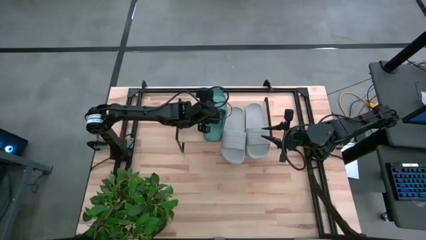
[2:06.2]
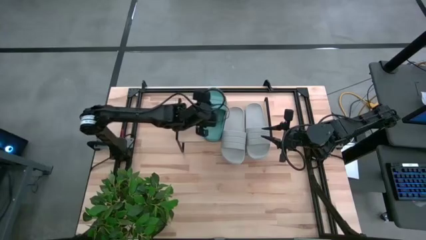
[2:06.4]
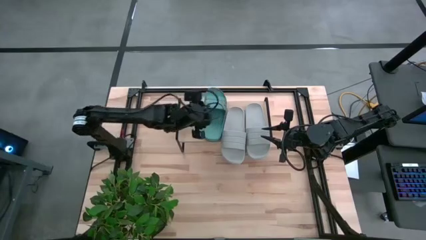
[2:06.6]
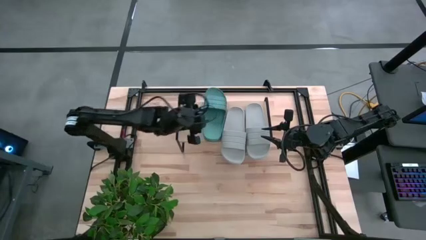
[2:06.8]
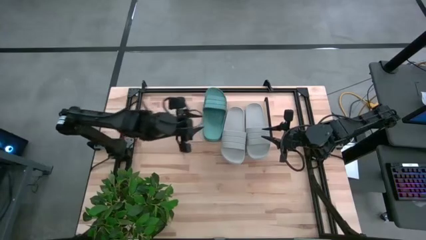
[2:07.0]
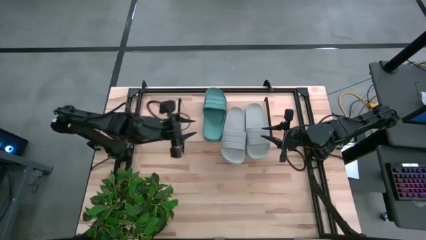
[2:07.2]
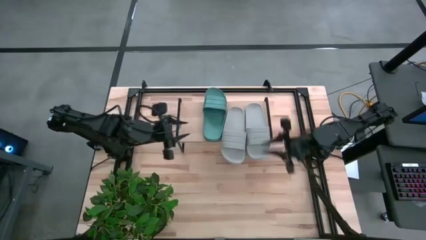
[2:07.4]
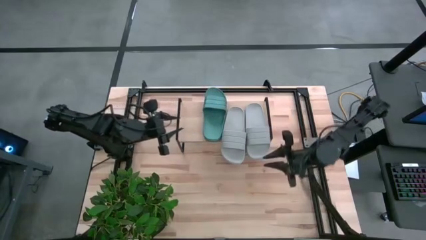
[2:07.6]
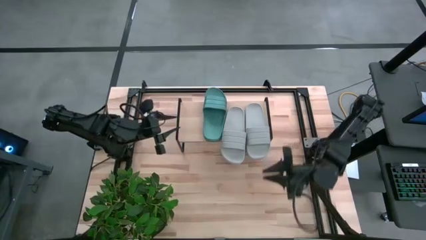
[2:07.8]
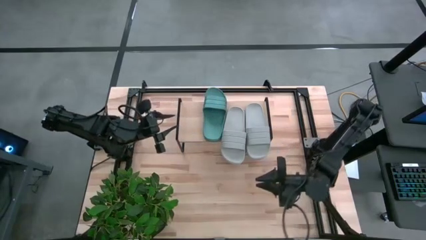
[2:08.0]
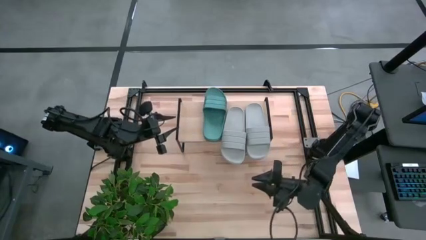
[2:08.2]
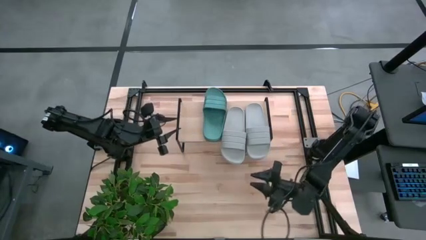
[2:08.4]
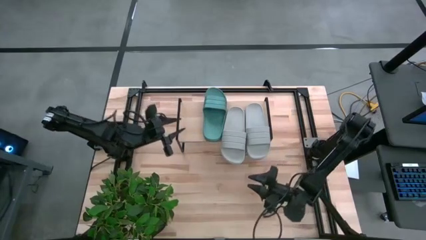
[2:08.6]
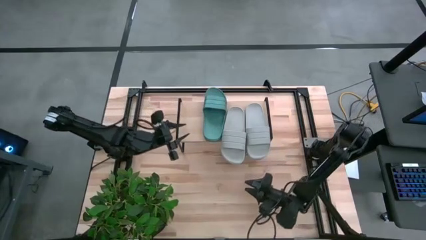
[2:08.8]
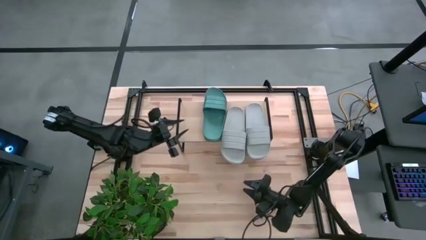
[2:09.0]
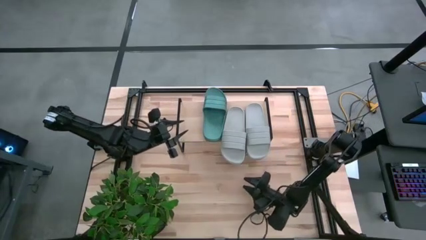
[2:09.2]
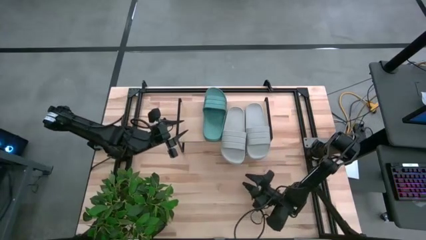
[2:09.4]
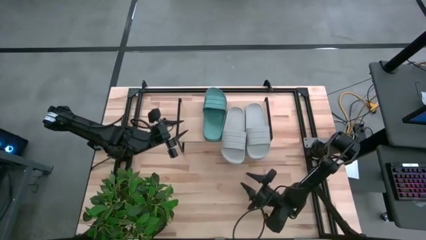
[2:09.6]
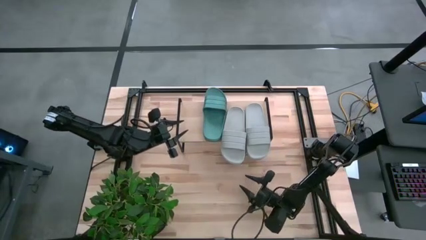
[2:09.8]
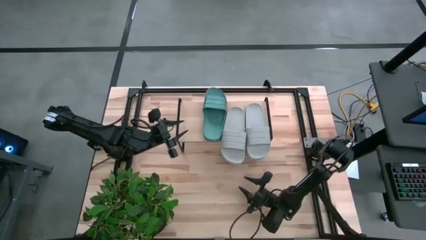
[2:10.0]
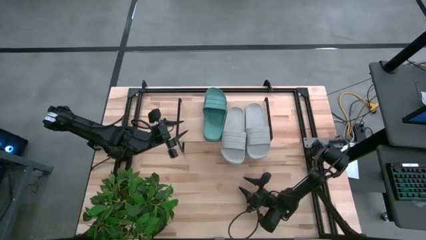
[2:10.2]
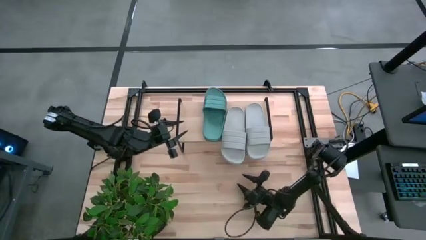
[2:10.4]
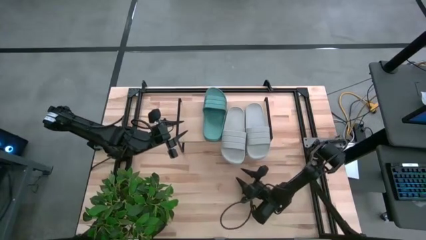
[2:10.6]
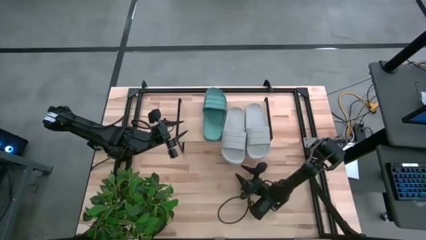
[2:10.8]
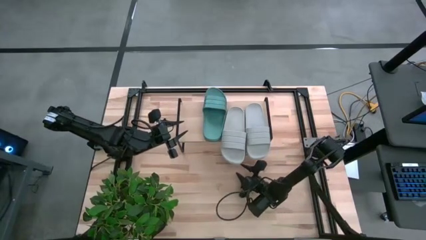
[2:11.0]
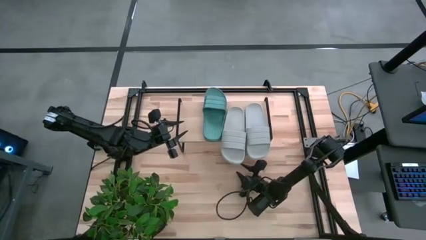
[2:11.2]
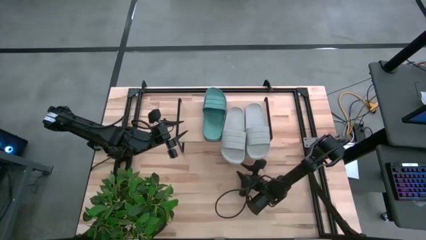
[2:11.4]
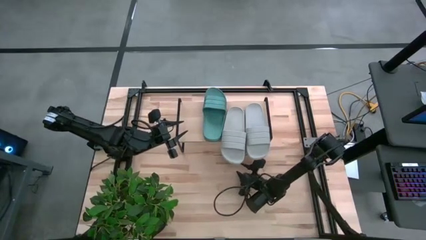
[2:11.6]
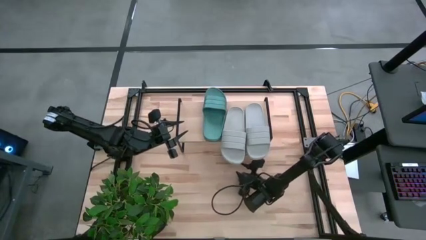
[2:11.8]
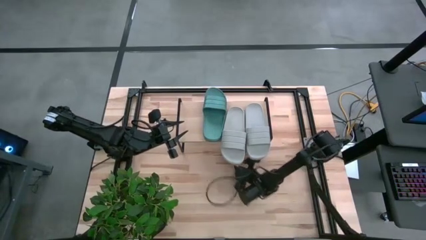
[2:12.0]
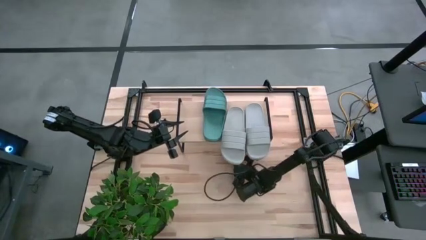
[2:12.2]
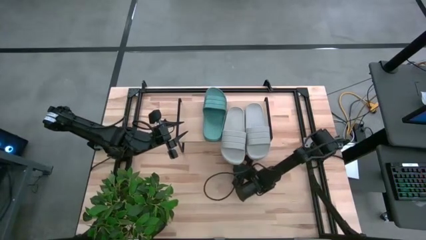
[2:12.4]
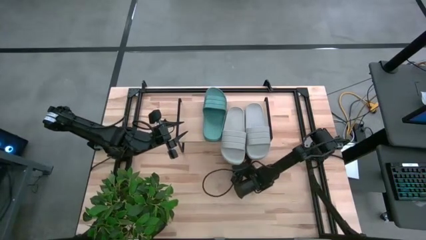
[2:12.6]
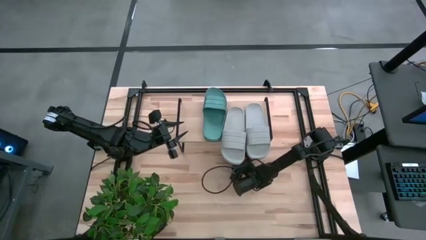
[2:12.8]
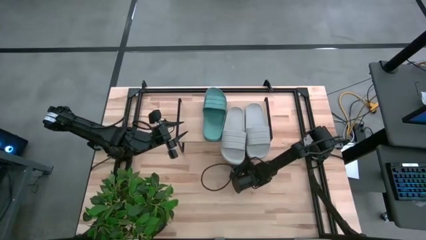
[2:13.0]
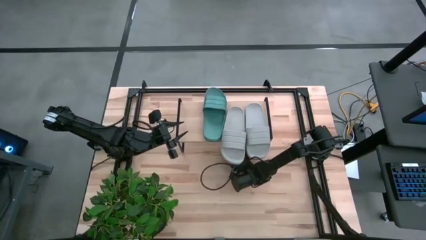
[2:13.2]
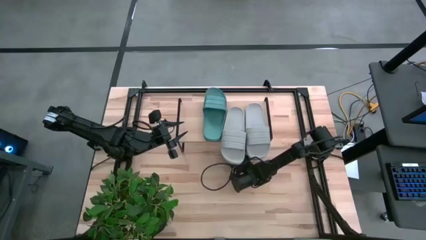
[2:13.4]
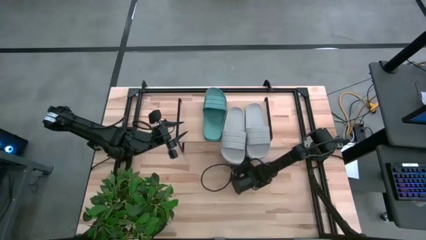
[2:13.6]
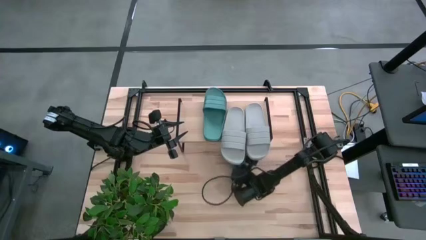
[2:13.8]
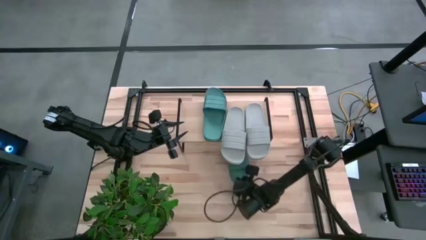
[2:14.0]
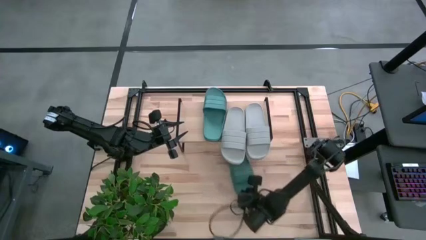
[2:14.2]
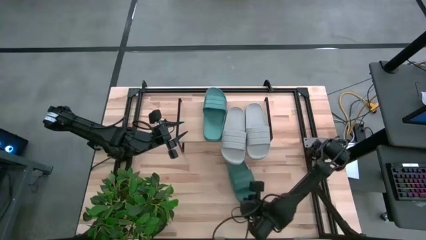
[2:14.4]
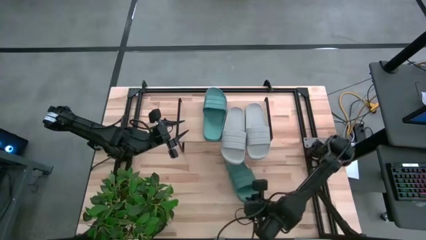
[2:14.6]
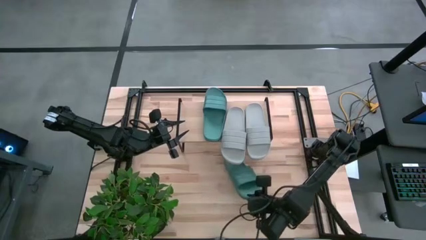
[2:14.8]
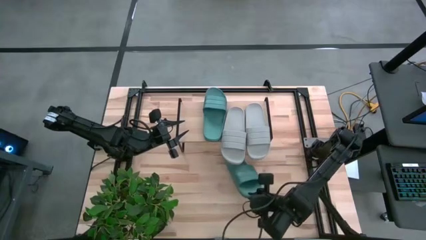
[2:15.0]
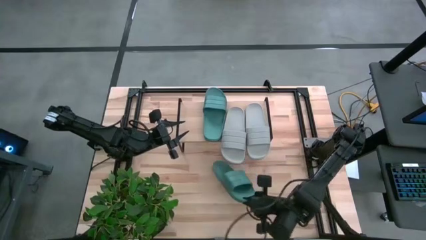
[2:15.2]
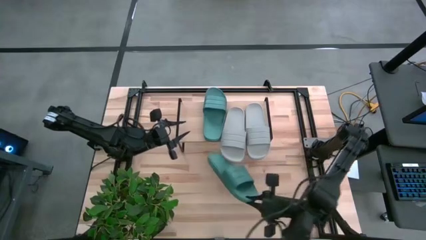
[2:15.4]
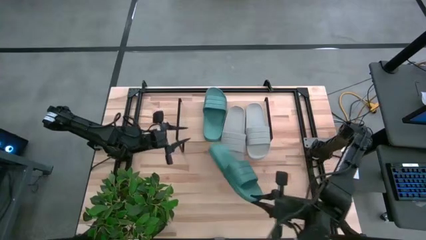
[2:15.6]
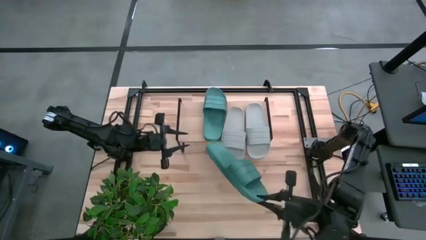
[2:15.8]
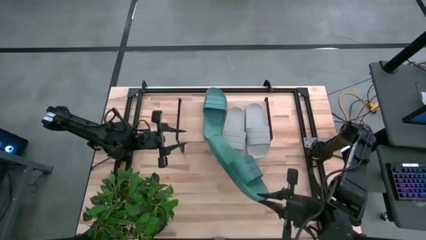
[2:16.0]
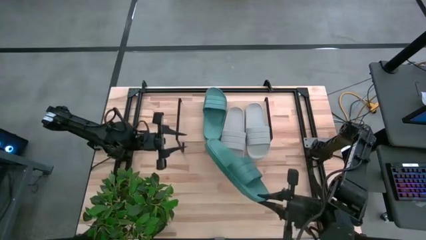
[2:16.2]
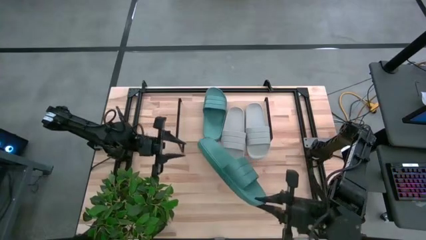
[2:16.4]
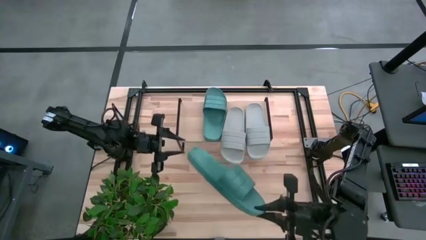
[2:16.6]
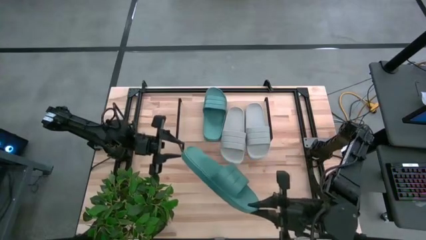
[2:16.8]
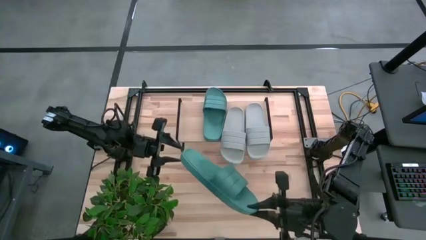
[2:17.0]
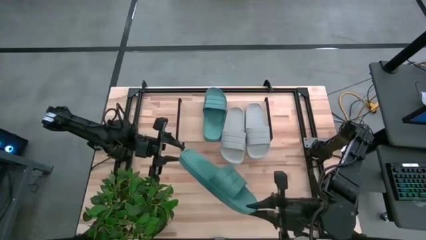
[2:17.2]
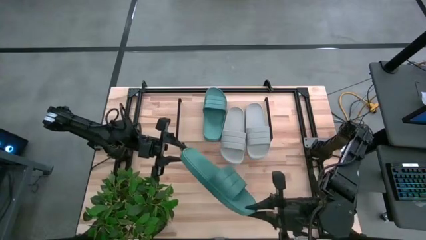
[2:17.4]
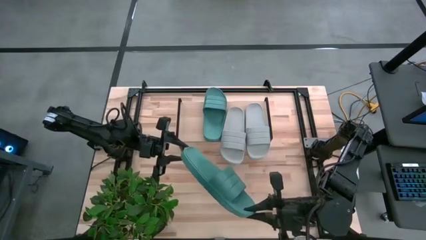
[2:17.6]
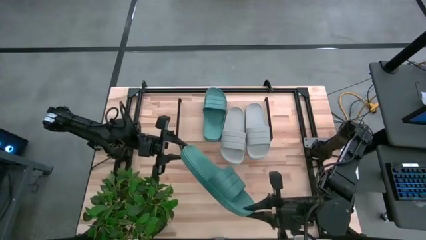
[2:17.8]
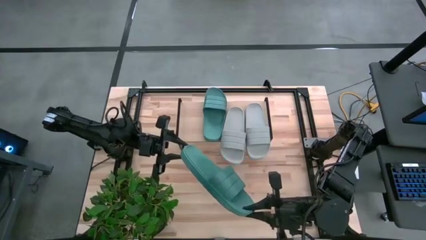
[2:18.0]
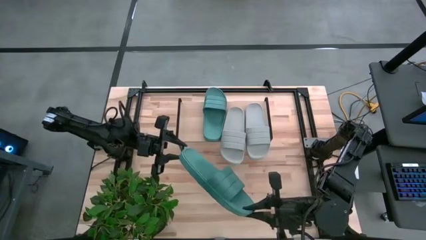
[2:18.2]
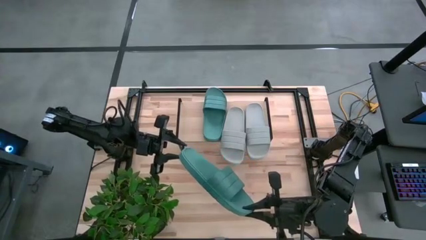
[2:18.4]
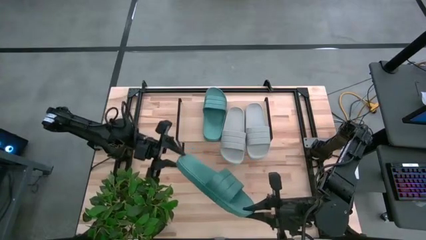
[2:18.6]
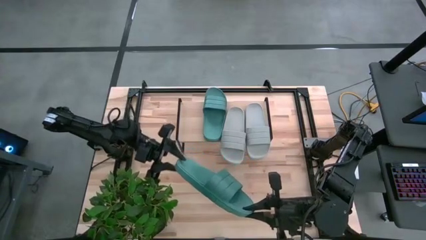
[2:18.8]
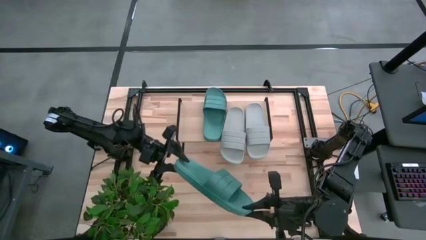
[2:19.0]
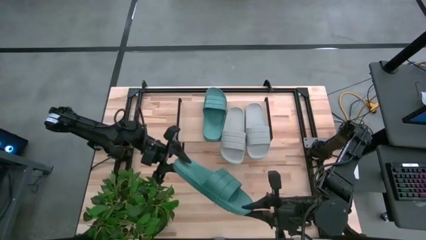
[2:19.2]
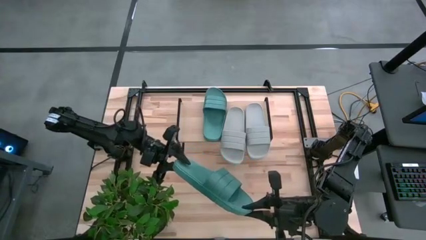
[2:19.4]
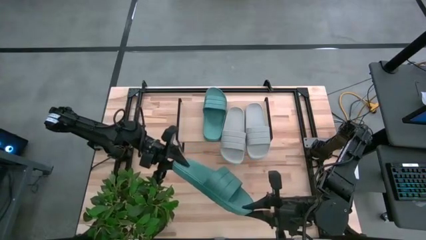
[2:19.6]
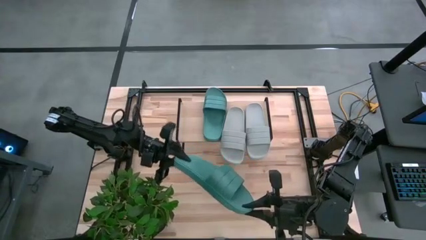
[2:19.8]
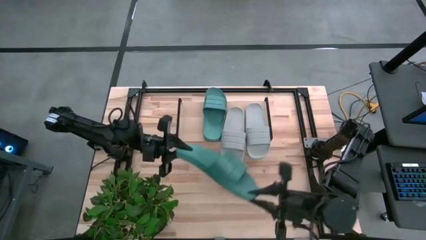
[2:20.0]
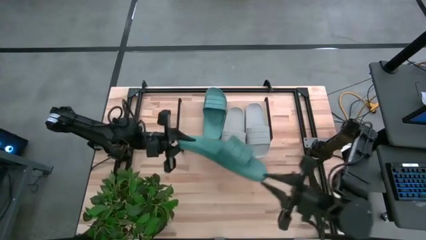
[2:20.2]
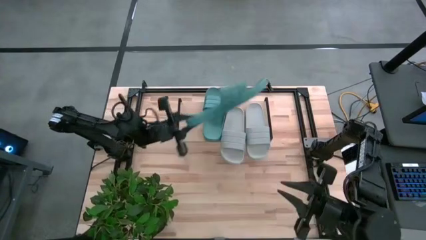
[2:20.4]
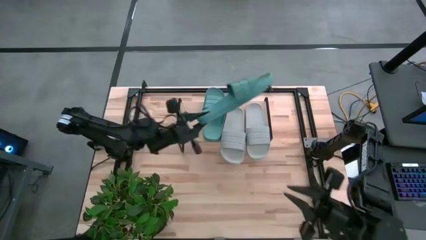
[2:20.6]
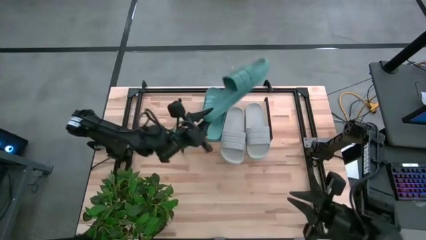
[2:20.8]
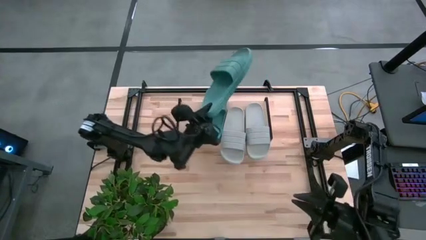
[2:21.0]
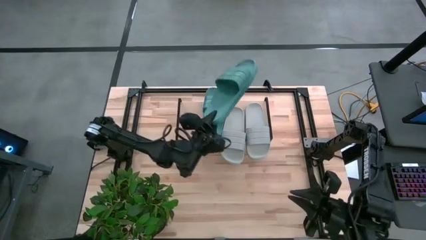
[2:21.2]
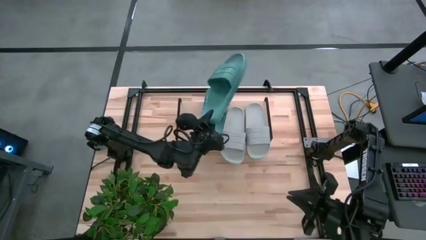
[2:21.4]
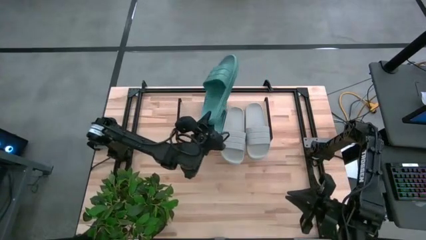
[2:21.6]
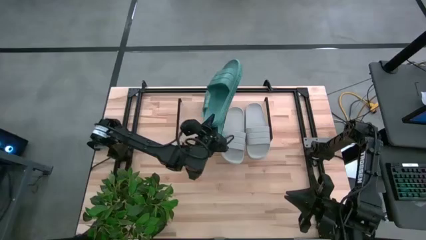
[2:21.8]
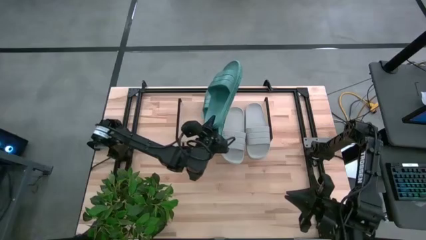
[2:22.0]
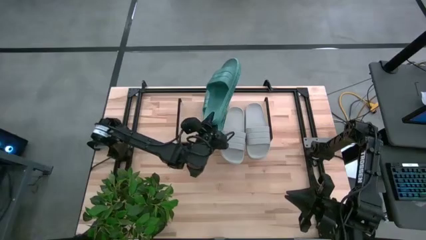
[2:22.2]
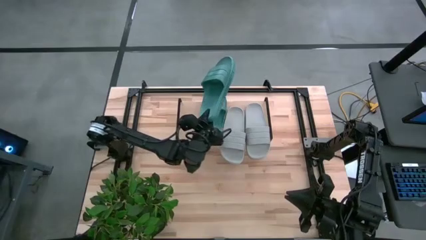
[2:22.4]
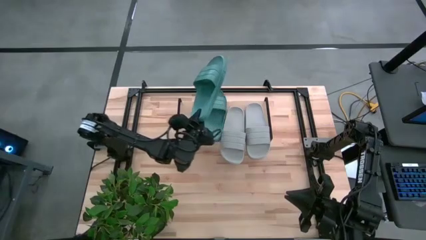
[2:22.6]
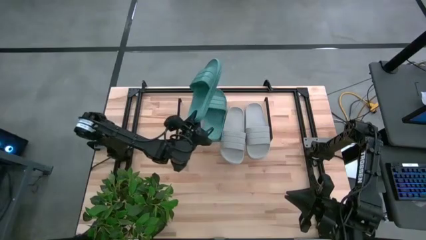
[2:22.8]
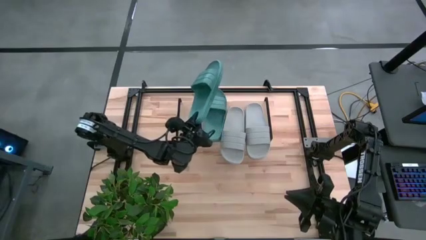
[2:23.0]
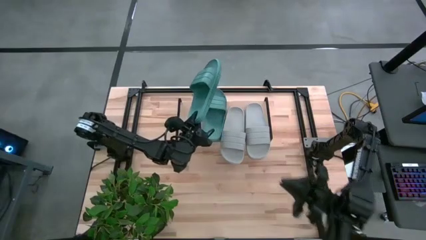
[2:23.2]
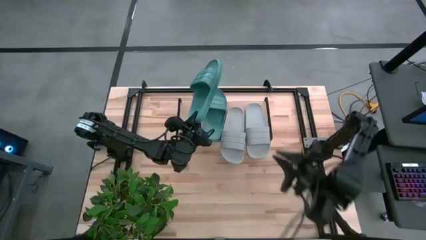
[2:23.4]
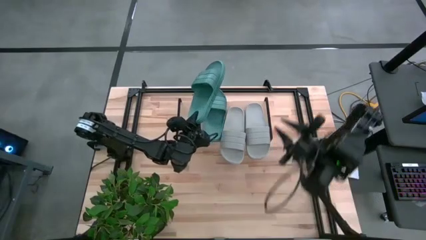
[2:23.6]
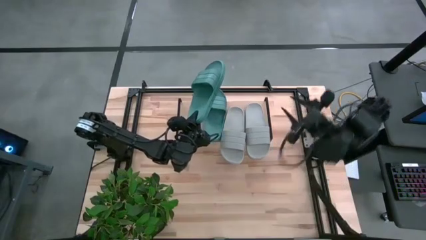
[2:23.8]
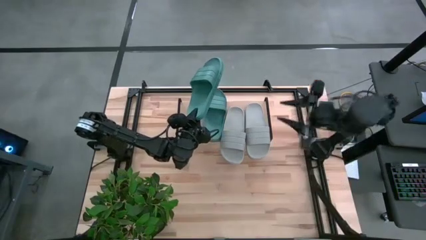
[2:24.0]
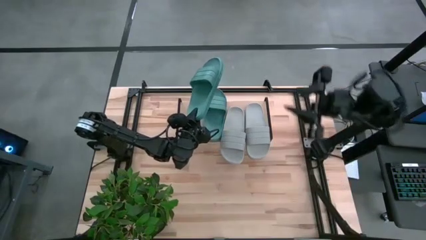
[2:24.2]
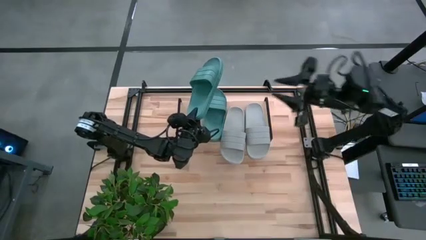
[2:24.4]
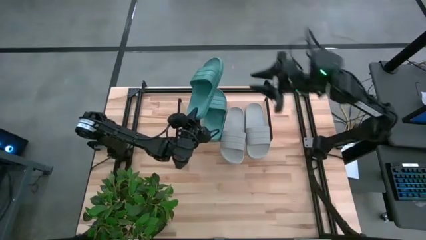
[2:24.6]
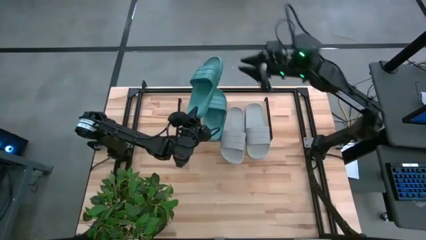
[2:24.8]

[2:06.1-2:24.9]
Task: Pick and place slides into the shelf
Put the green slides on the shelf
